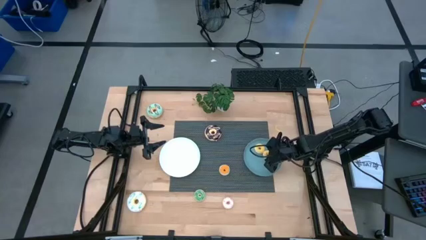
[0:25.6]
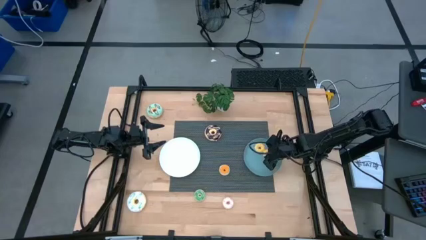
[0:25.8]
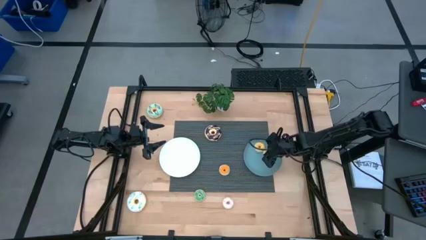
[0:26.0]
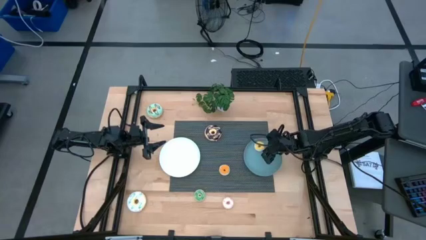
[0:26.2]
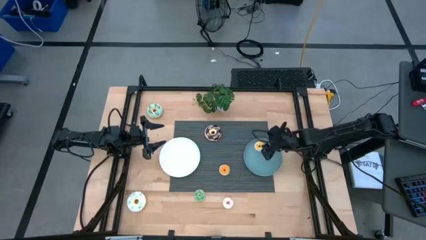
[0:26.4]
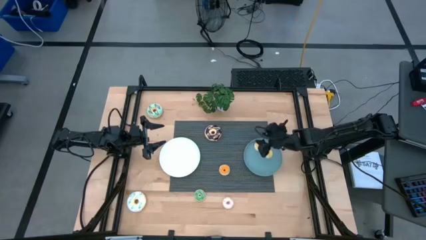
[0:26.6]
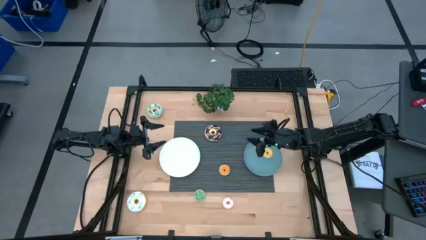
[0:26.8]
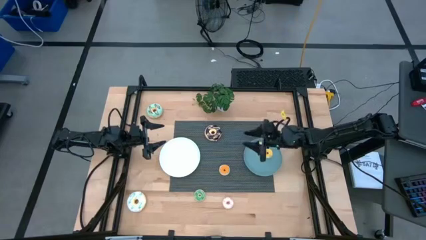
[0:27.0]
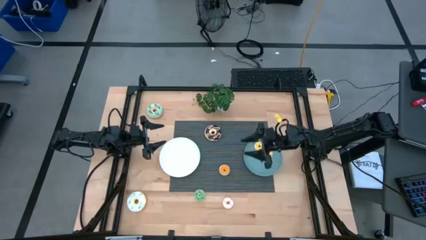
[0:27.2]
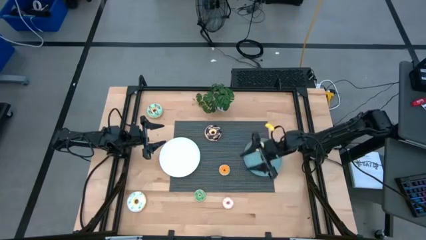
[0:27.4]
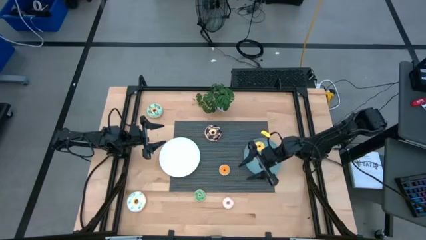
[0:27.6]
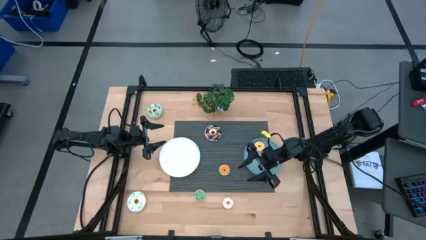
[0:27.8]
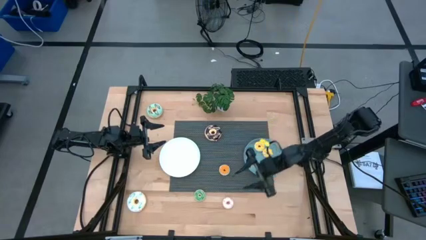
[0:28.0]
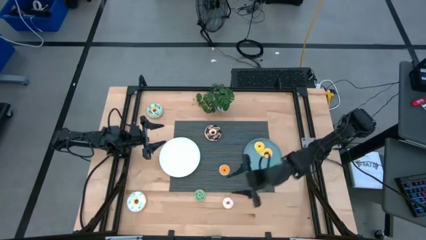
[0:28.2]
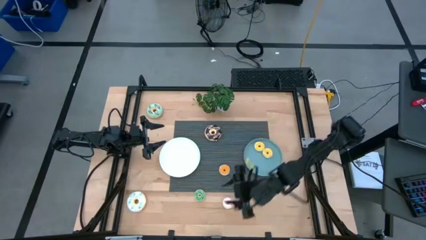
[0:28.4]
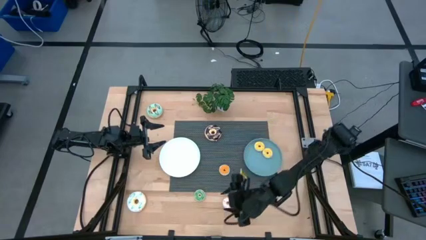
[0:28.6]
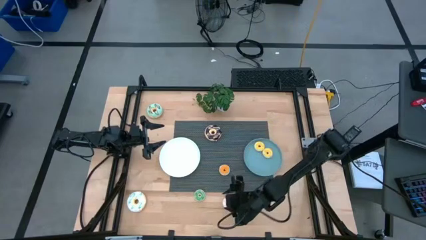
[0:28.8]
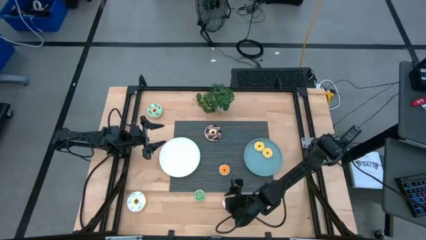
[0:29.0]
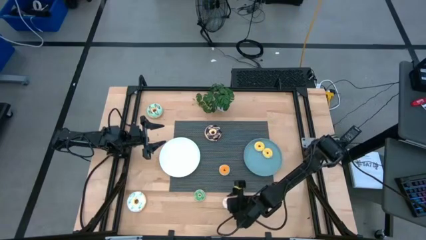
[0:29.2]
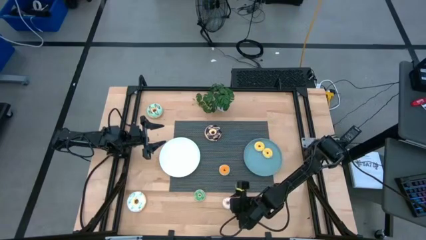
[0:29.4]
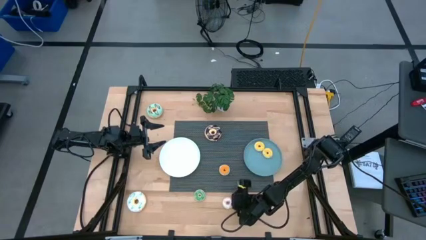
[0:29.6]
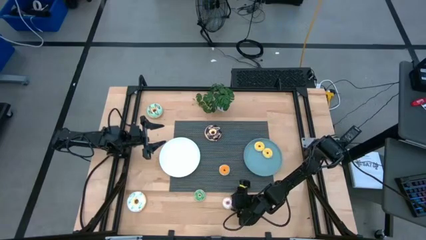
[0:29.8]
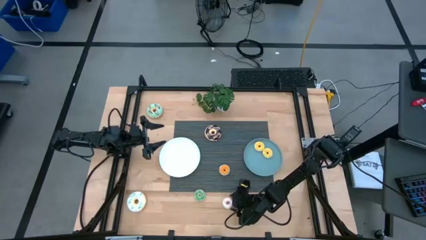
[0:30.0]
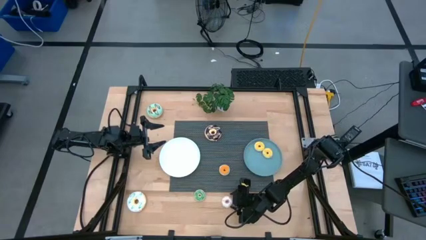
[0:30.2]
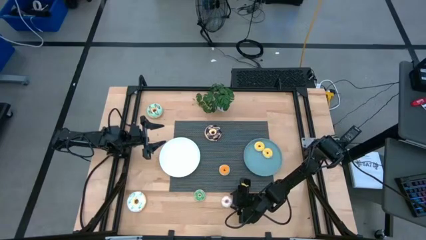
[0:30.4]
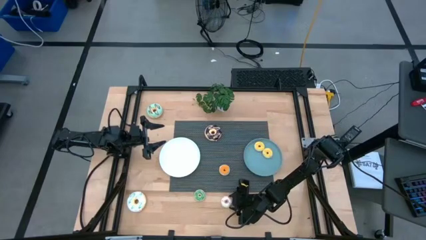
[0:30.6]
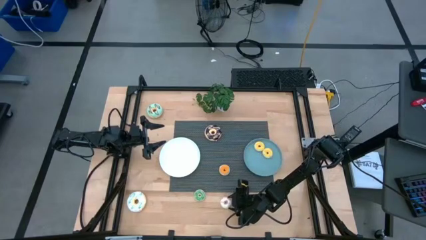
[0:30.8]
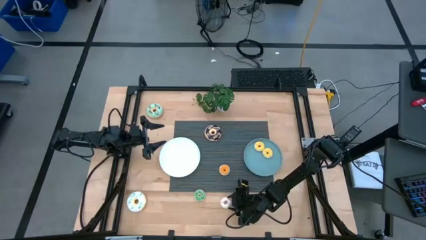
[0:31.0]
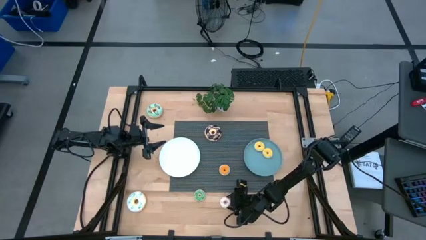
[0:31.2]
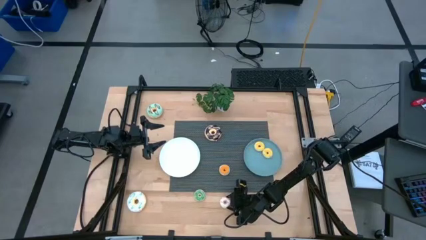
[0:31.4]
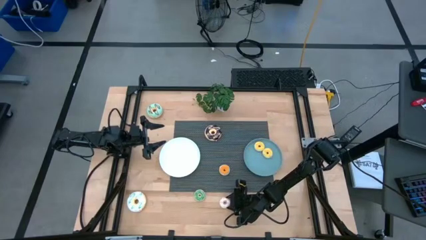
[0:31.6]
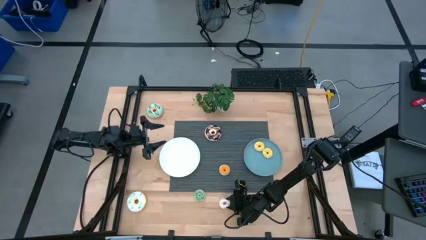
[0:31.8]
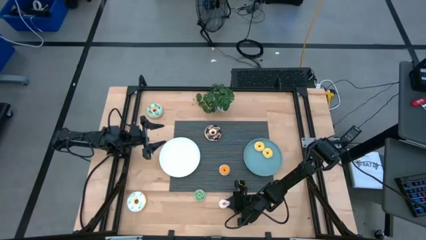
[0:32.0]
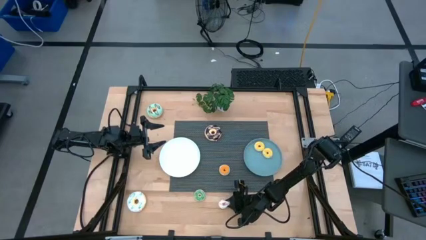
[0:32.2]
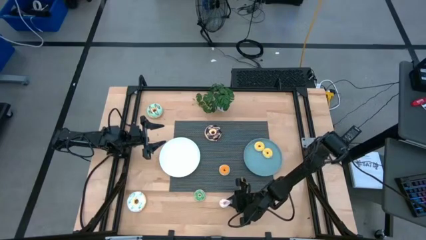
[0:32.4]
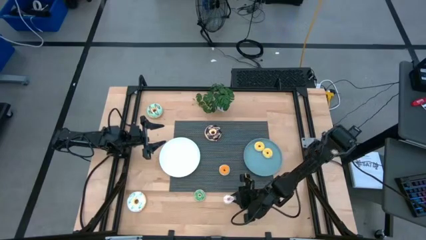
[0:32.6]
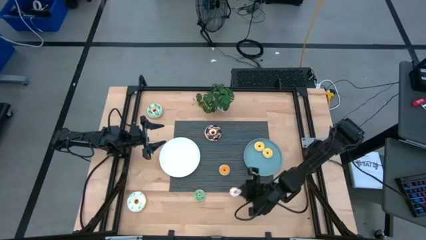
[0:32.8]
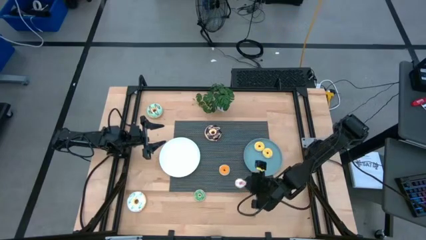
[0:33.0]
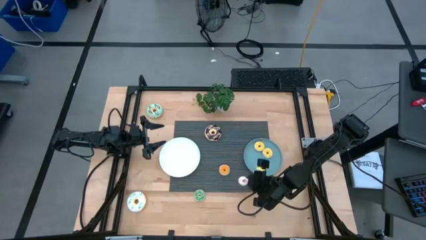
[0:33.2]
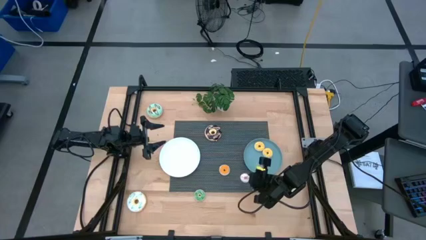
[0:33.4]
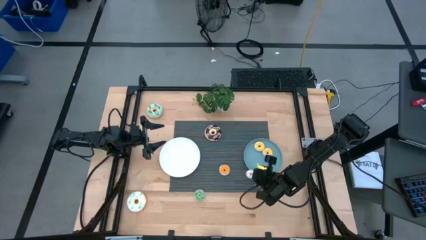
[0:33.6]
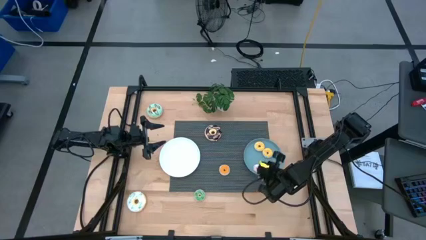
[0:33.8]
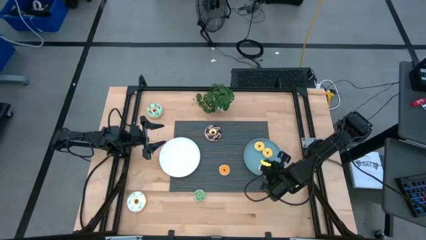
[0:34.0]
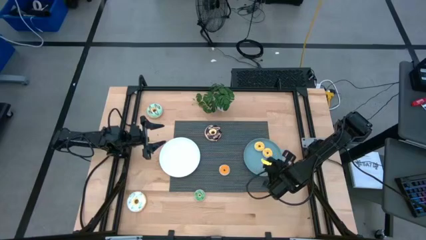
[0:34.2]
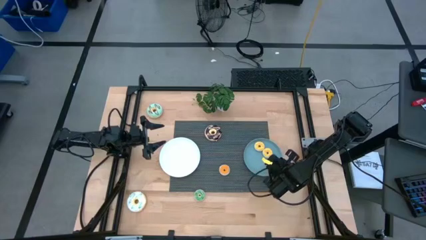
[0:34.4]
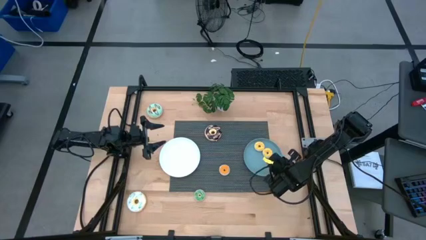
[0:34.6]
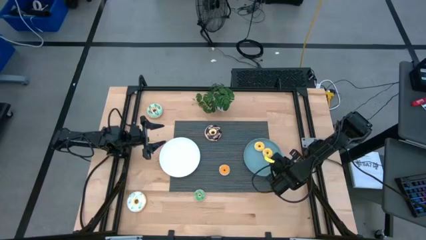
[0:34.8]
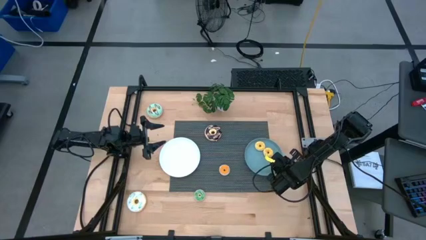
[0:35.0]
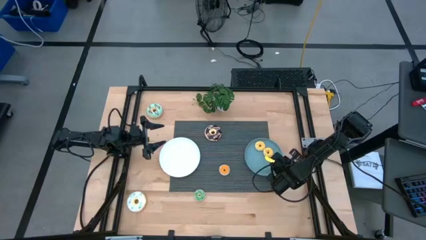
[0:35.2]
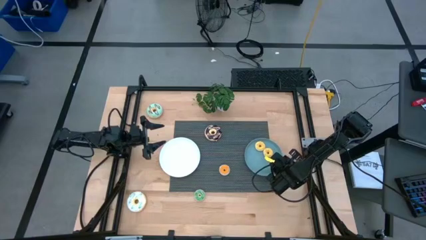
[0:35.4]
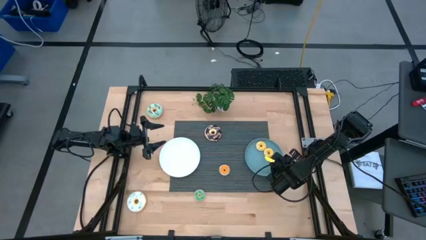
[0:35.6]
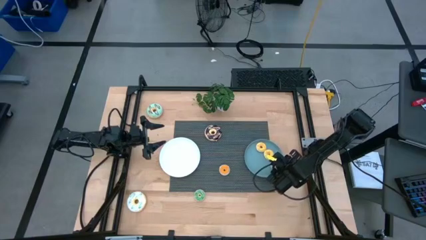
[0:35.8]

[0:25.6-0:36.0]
Task: Pick & Place donuts
Put the right small white doughnut on top of the blue plate
